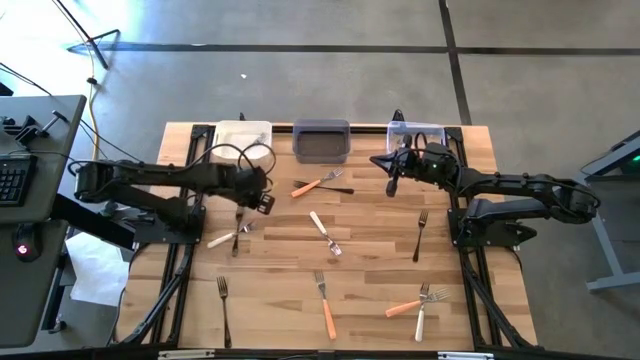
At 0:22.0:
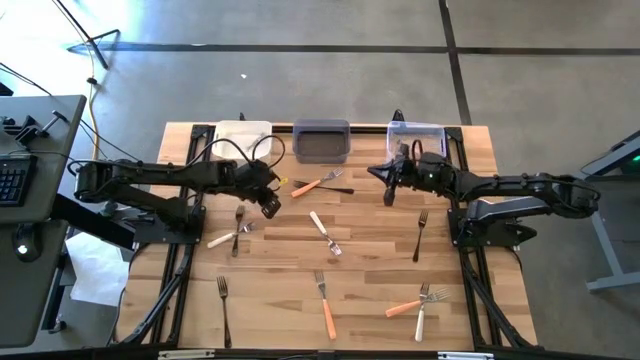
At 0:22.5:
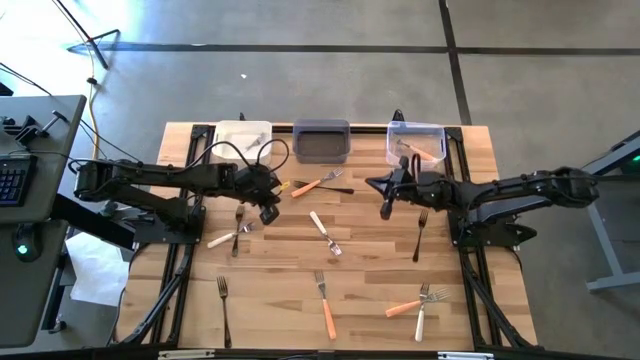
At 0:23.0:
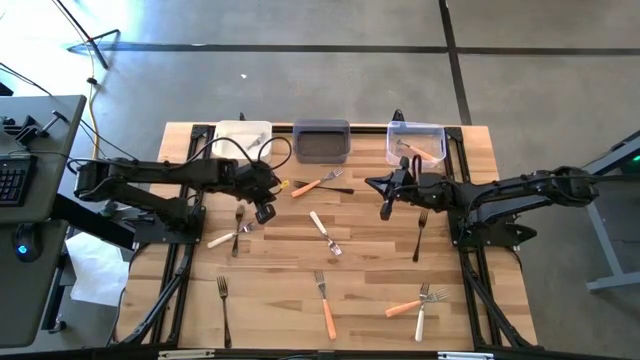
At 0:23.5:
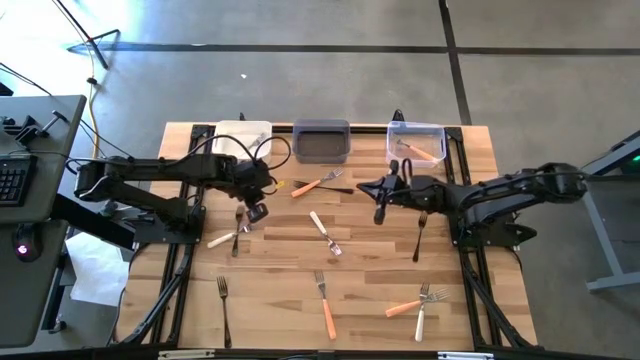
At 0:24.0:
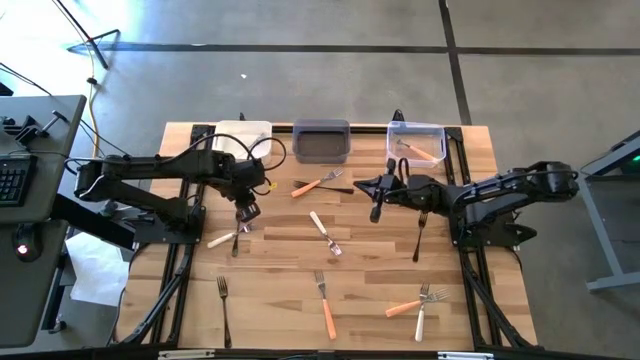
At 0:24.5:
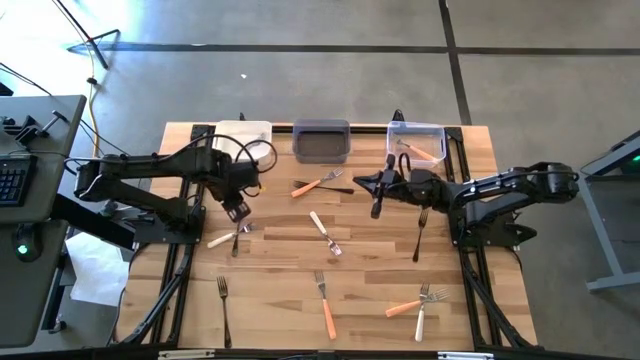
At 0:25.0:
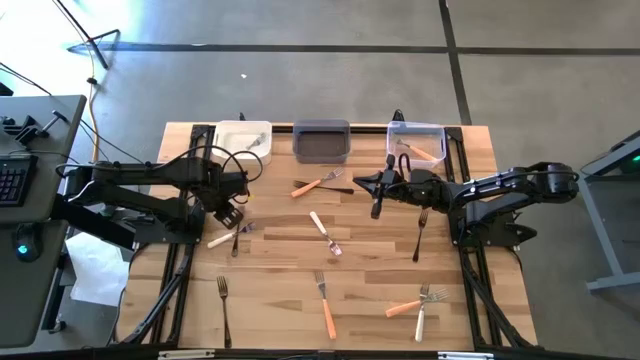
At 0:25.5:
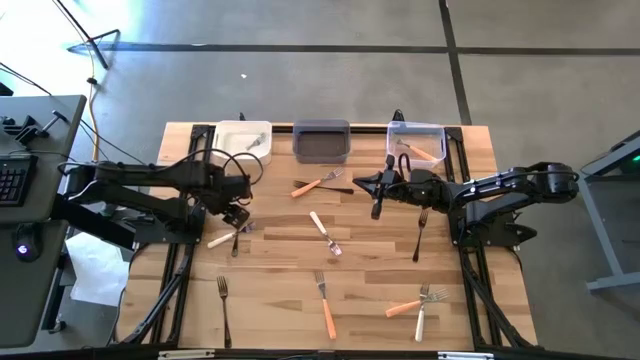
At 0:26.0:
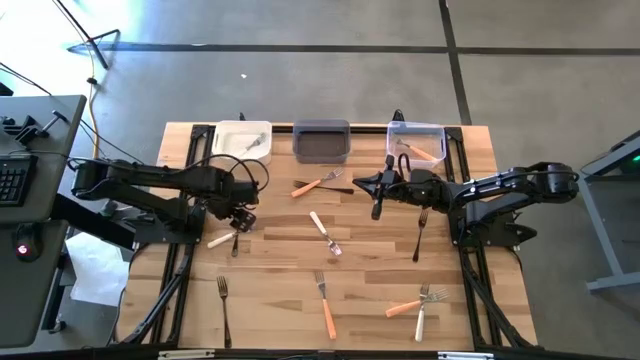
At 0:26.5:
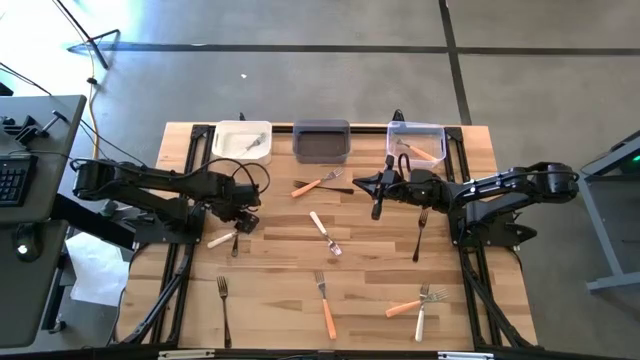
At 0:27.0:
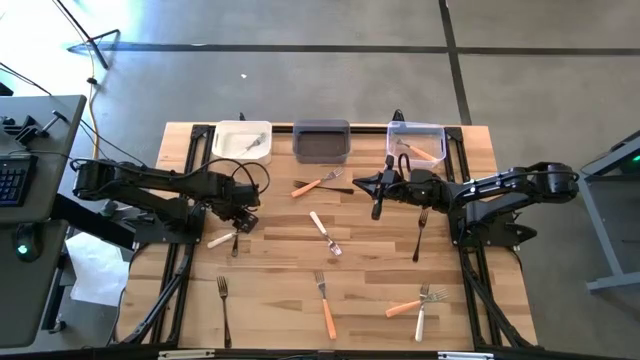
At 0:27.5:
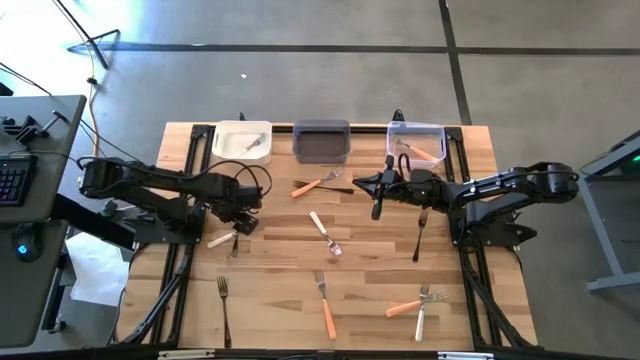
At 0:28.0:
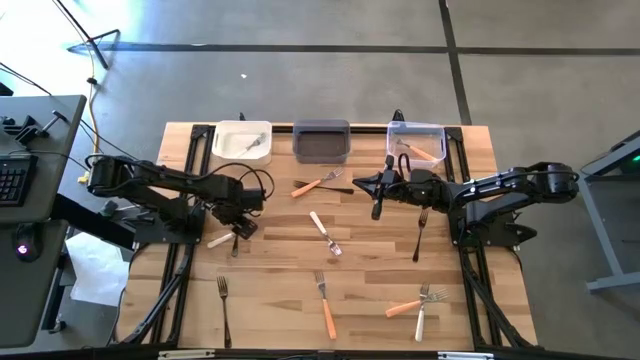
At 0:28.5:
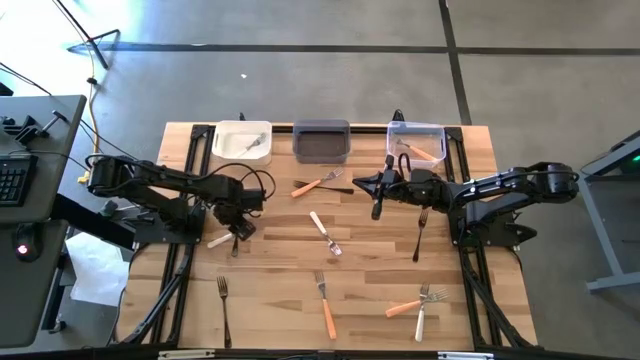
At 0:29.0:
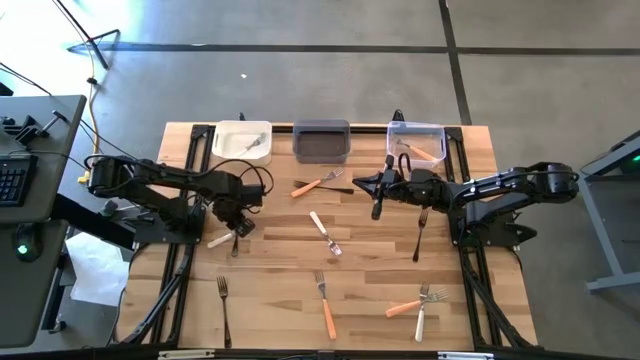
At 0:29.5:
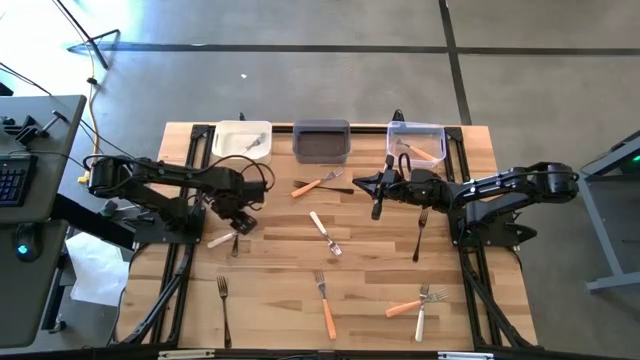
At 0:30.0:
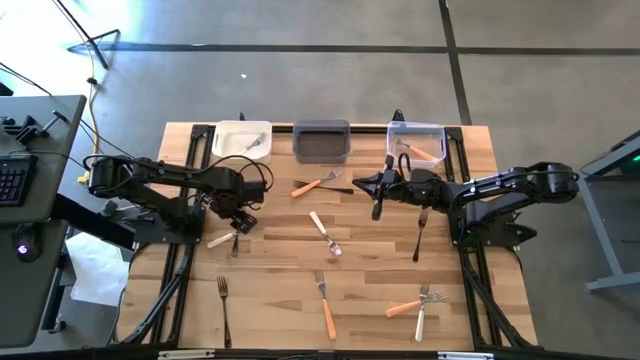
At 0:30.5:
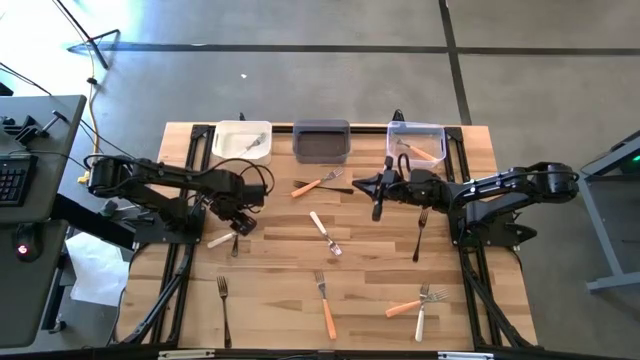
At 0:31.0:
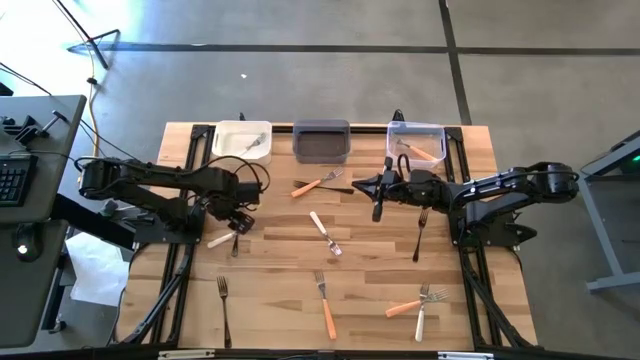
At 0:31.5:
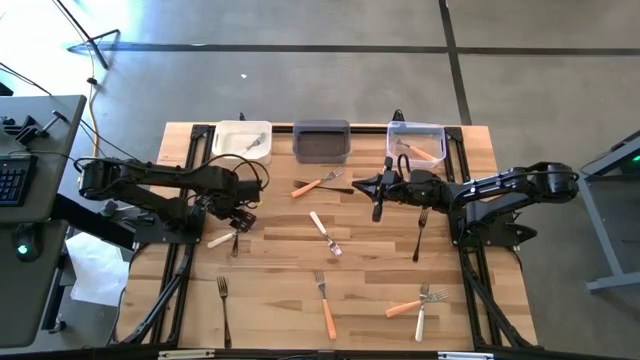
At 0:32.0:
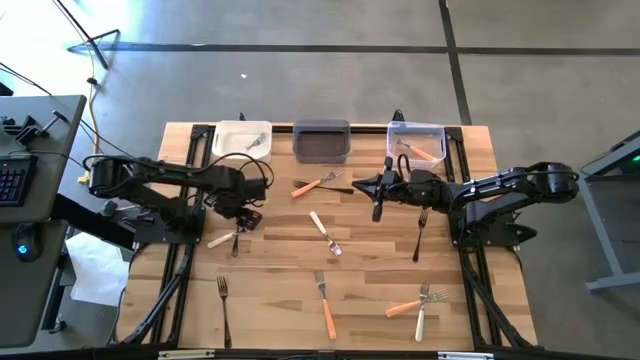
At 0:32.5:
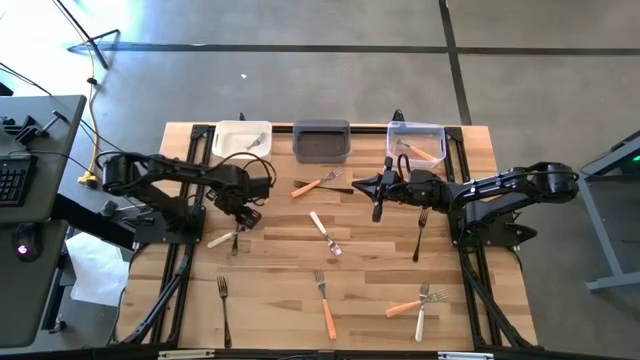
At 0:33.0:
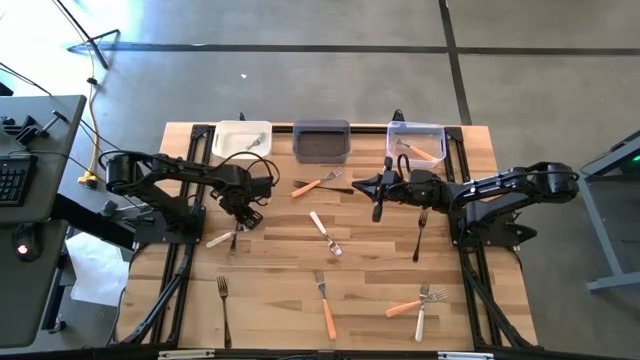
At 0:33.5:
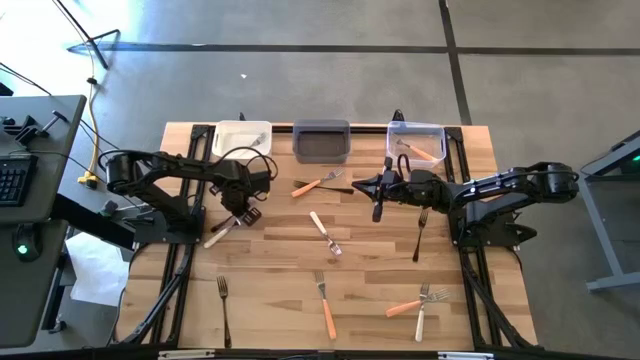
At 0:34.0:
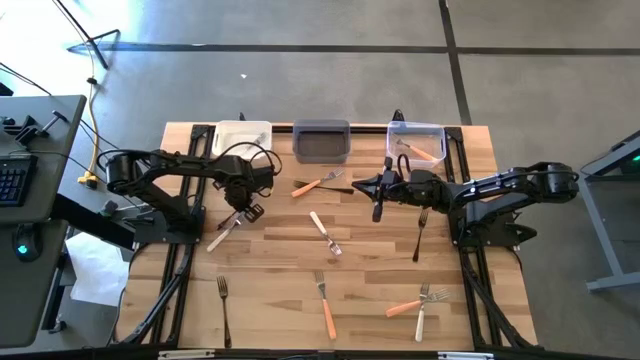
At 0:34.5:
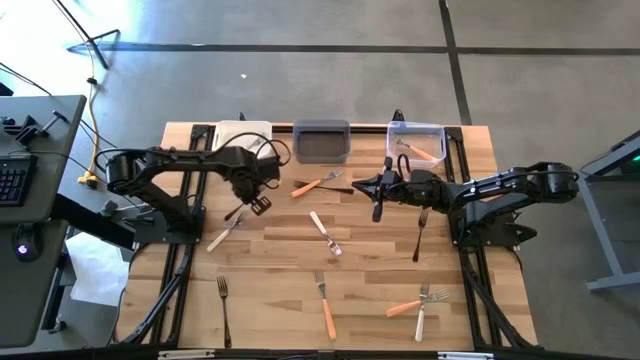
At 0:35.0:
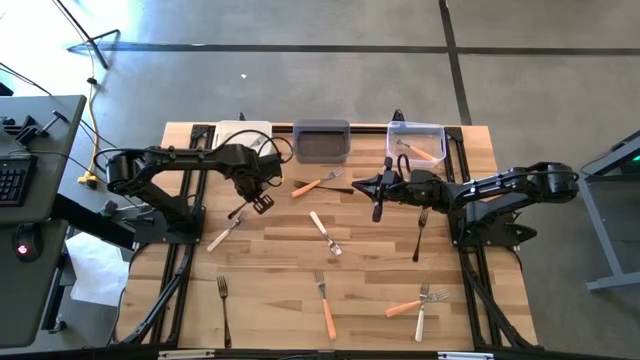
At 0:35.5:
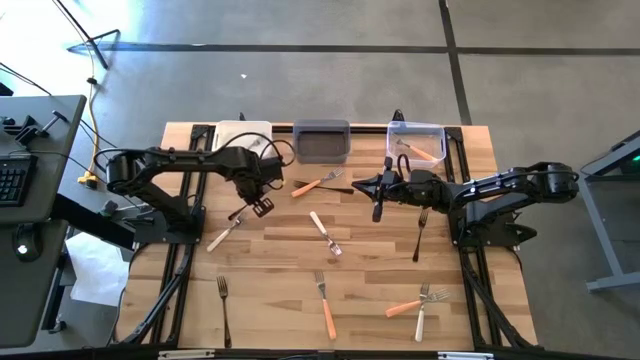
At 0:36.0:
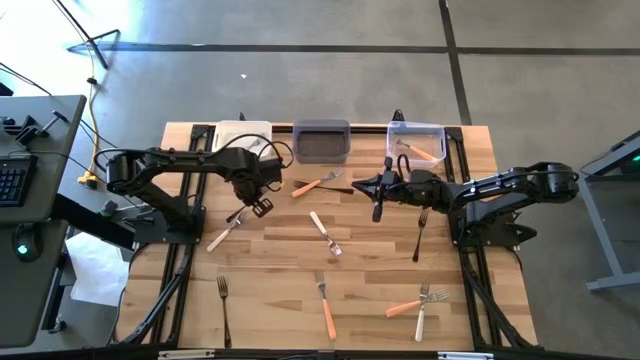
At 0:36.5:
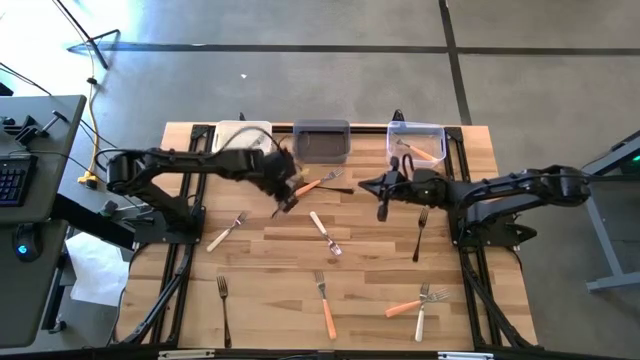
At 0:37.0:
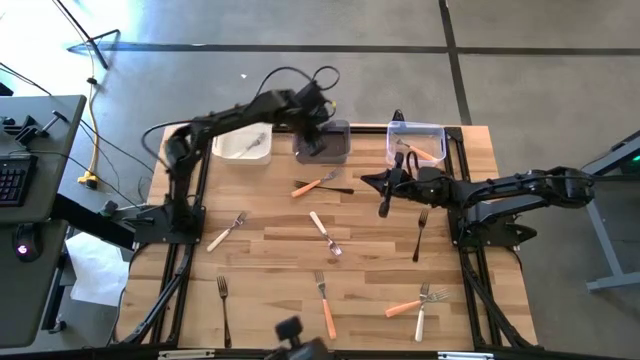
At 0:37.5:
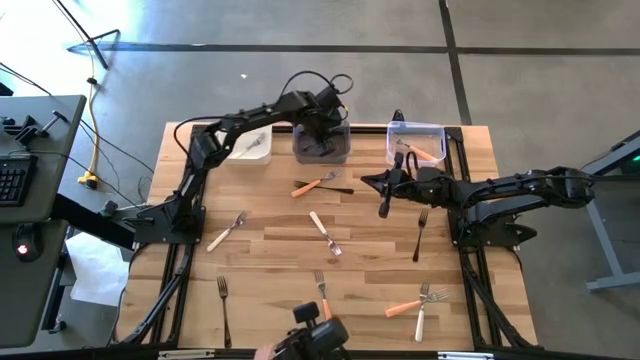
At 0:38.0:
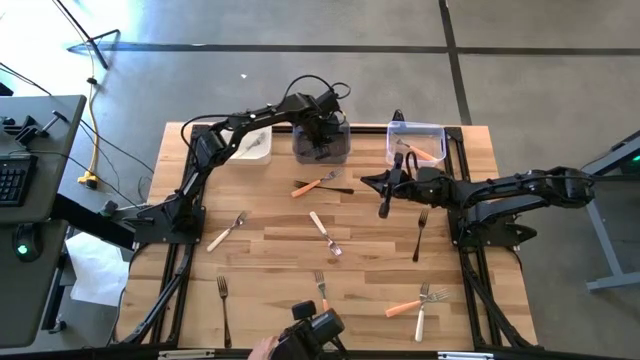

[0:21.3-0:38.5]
Task: Sort silverware by color (type)
Put the black fork into the black bin
